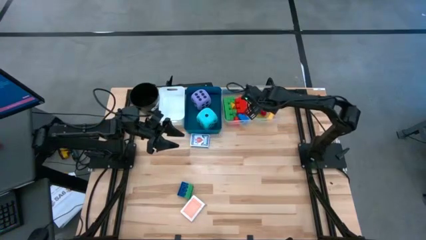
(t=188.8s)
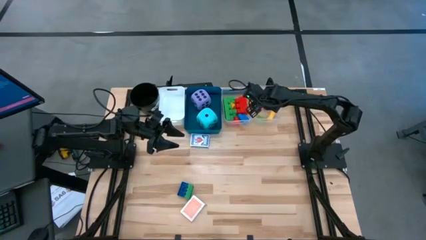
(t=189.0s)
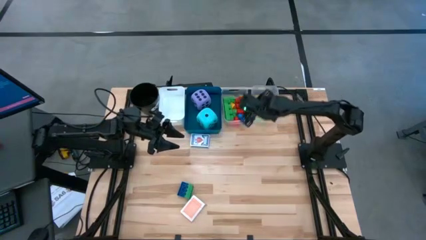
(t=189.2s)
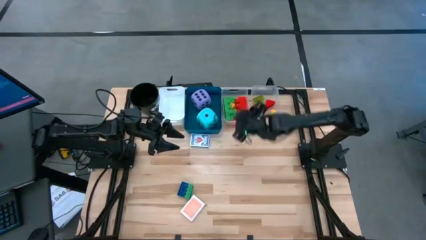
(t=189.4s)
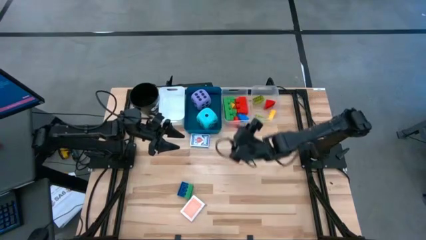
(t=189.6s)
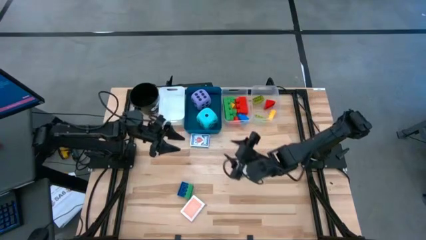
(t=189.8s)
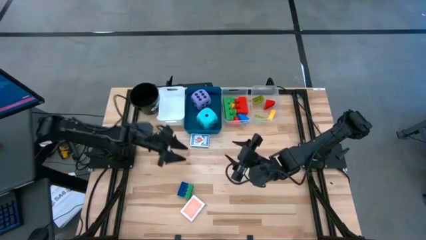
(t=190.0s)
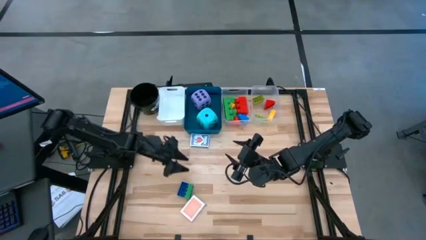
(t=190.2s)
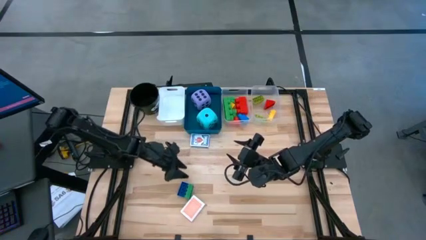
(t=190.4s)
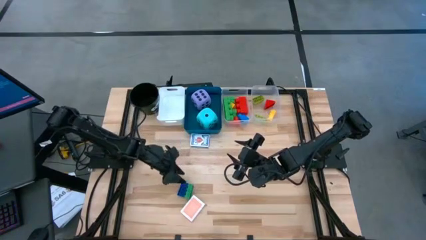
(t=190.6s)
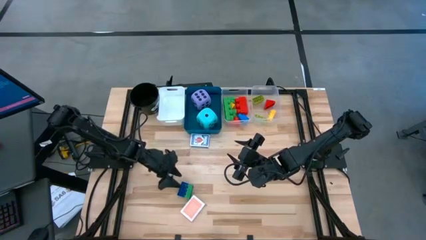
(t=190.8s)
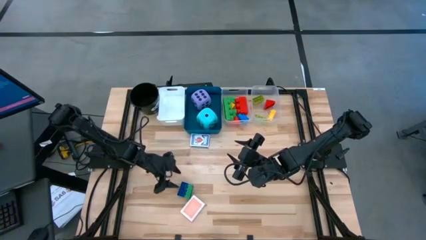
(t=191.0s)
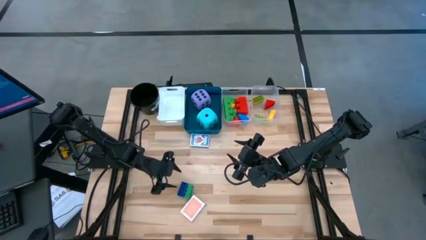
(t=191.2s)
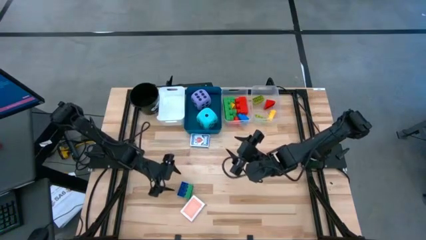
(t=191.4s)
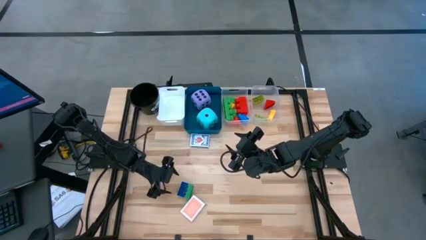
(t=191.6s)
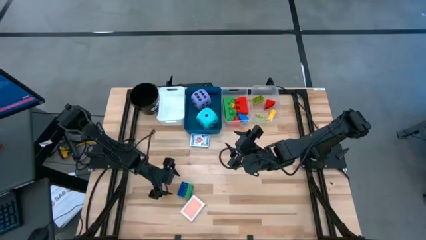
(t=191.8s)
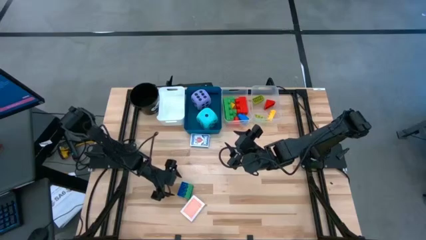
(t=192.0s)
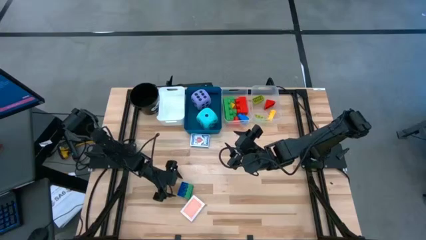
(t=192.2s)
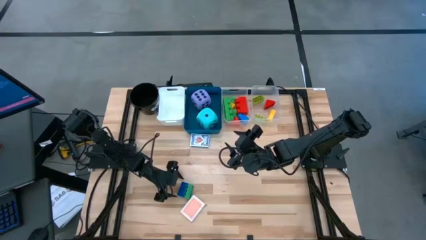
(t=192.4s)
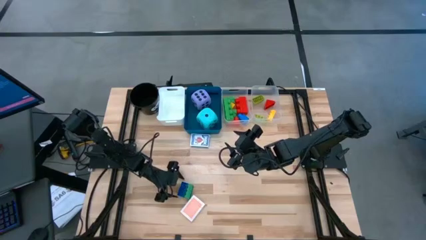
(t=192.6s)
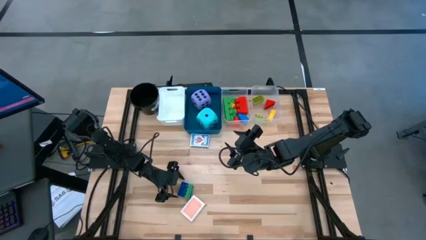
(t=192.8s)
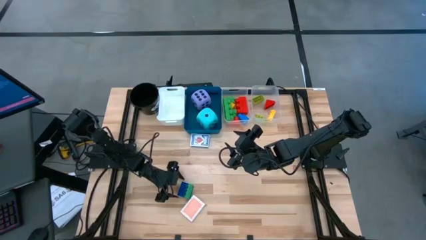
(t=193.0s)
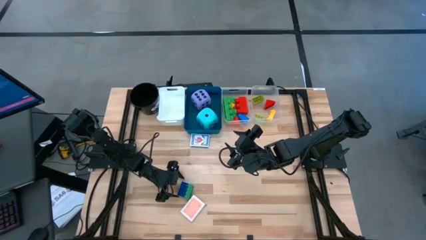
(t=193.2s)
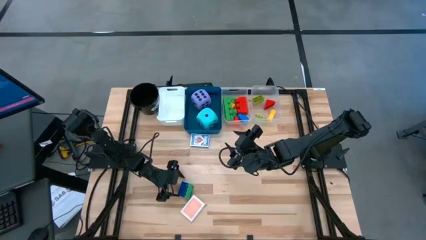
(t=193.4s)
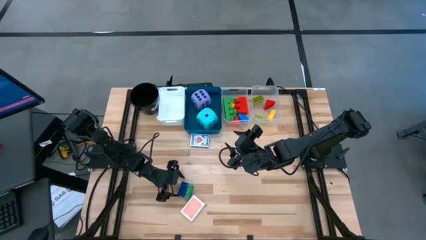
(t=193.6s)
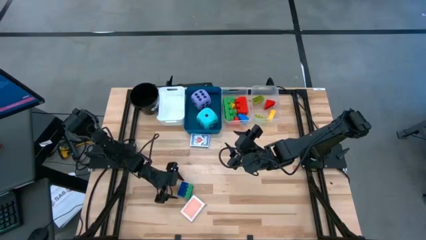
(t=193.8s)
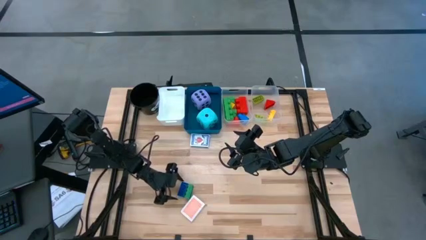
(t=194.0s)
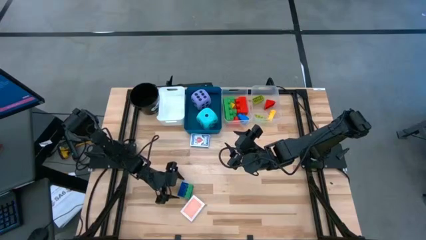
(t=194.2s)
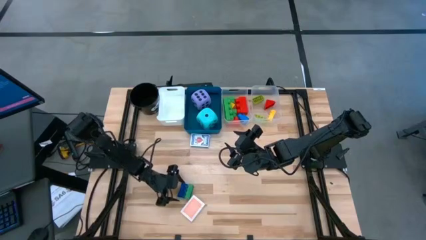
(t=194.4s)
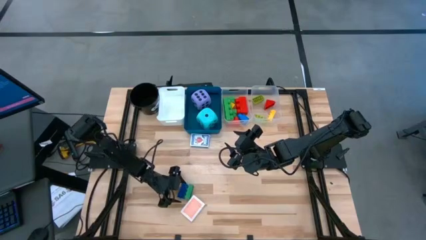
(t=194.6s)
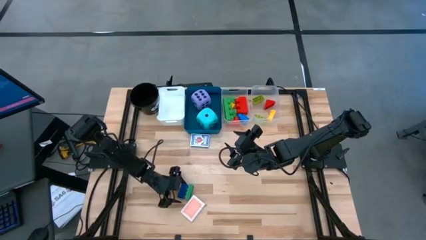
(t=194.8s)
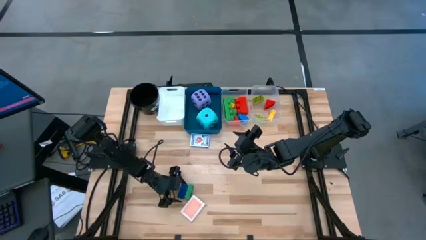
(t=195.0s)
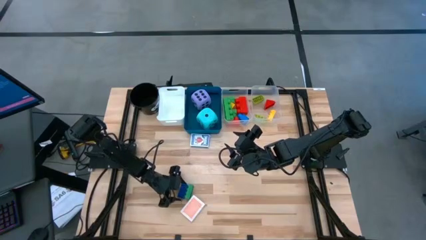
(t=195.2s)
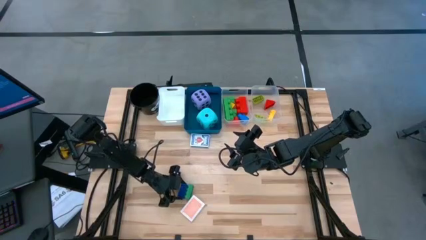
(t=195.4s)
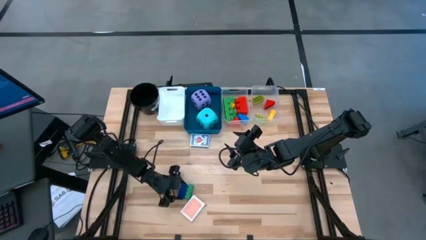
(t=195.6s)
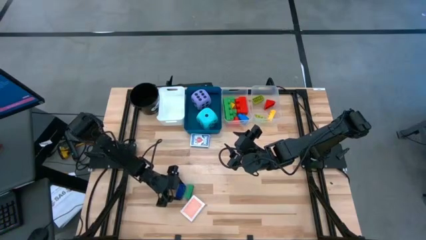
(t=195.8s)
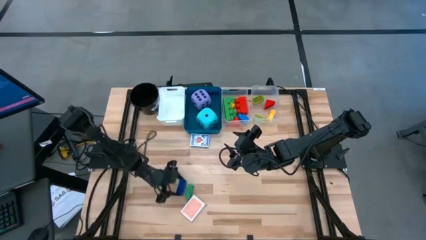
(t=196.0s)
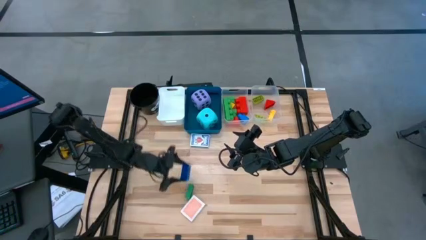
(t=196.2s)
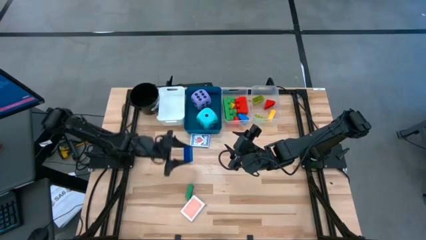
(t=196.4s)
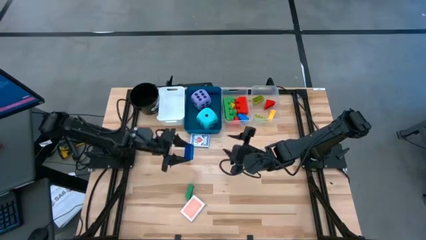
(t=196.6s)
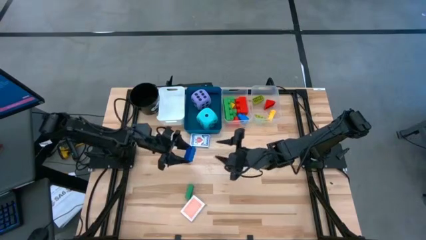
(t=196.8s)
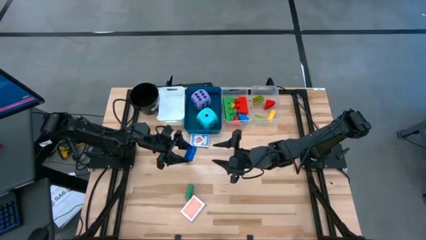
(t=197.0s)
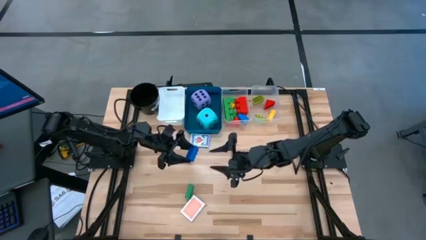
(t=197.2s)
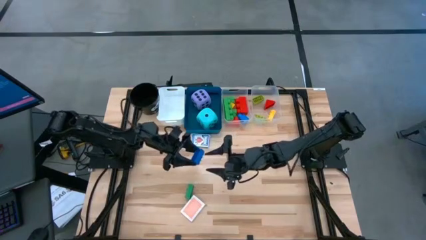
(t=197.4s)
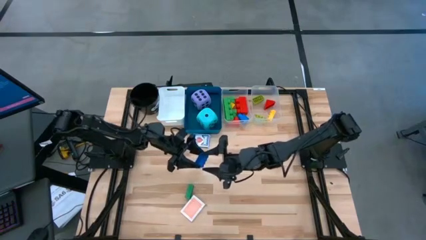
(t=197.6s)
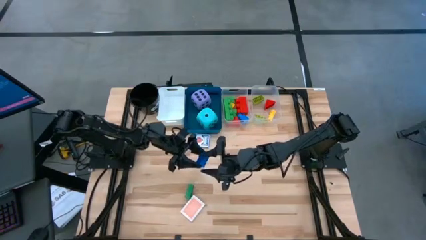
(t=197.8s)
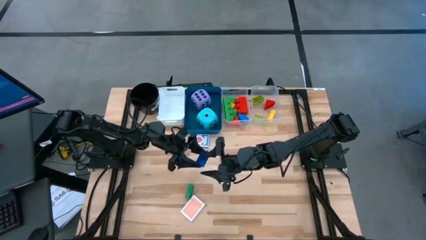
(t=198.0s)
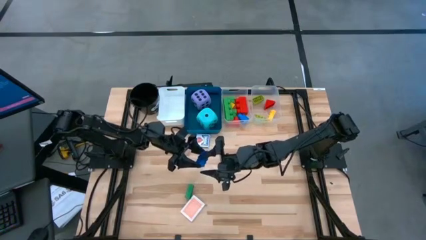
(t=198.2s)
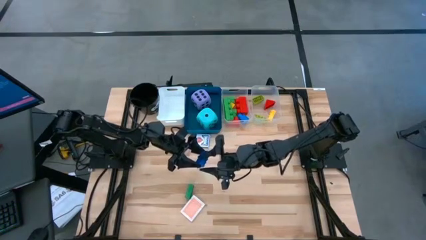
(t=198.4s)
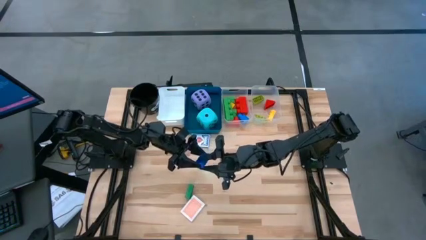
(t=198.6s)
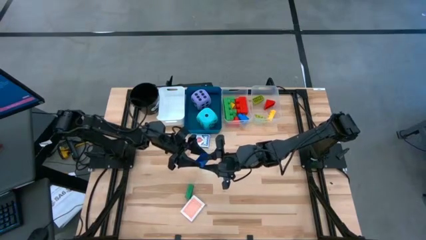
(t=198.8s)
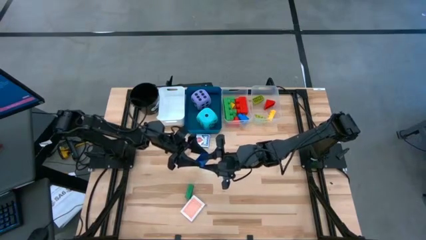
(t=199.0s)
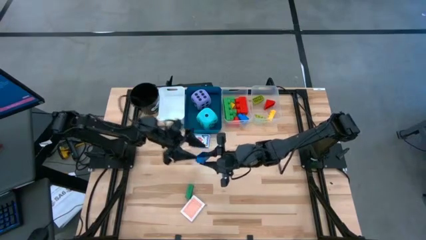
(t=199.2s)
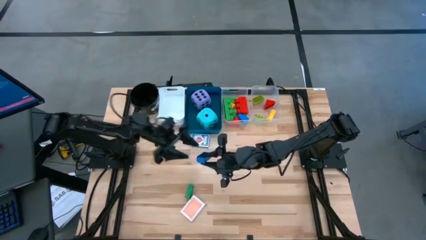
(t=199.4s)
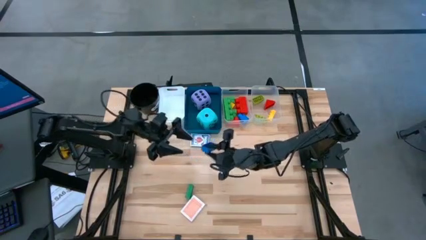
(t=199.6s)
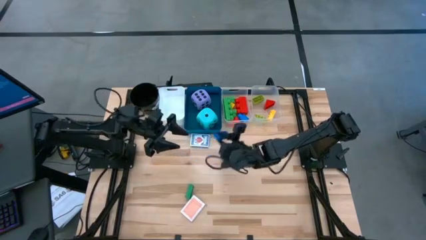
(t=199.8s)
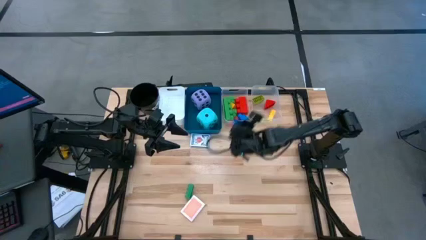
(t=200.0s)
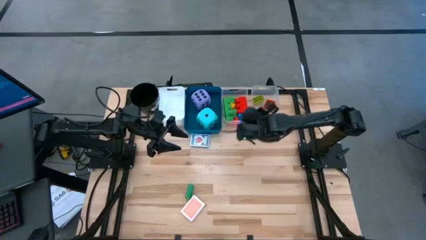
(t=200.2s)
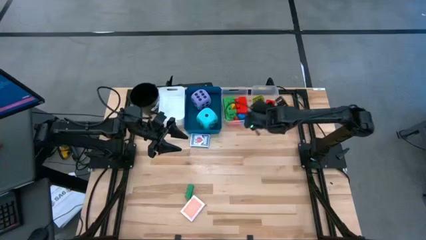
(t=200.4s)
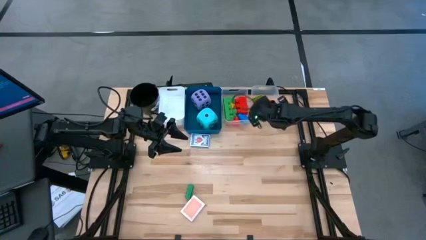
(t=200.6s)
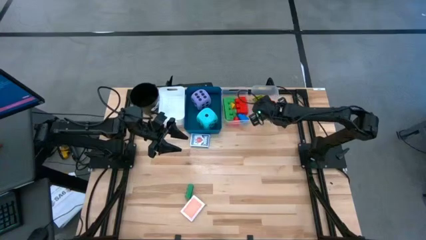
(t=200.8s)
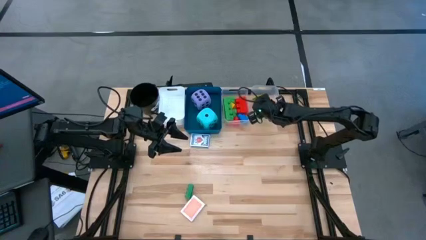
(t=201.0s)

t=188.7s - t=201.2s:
Task: Pick & Place Toys
Put the blue 8 stud game piece into the right transparent bin

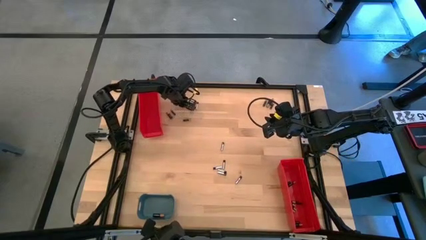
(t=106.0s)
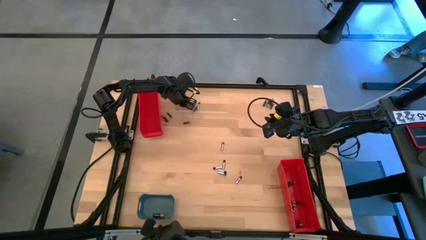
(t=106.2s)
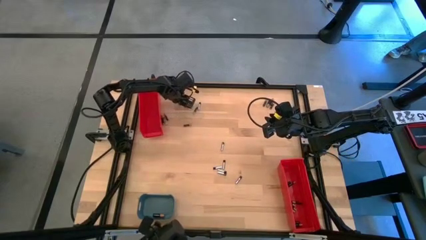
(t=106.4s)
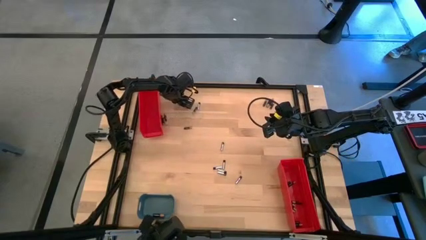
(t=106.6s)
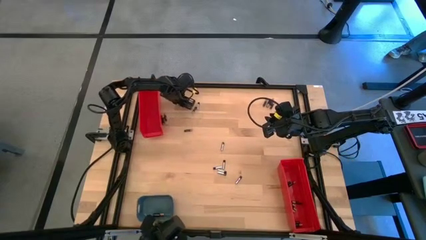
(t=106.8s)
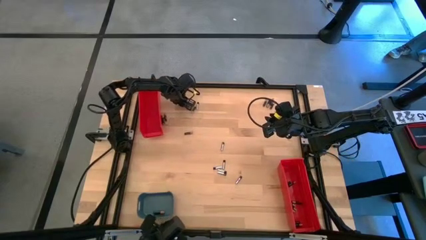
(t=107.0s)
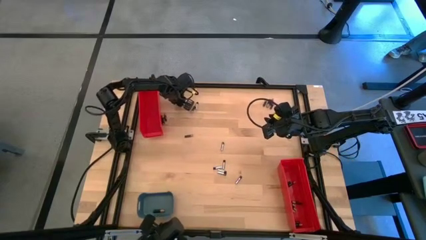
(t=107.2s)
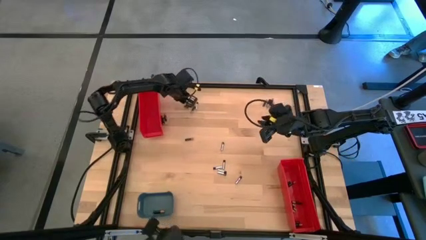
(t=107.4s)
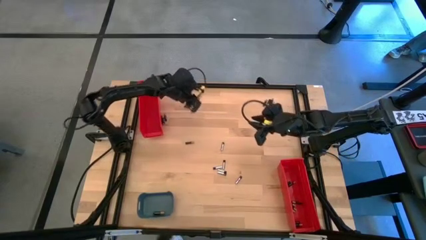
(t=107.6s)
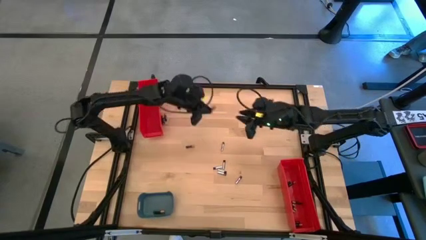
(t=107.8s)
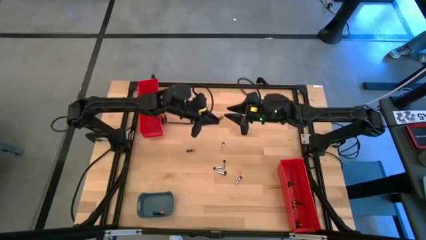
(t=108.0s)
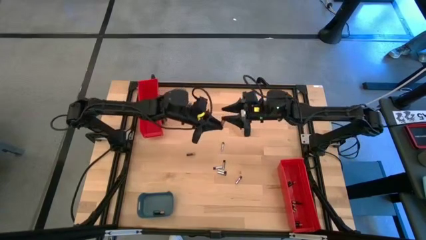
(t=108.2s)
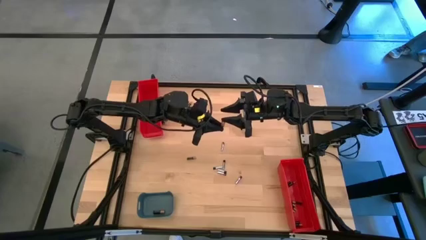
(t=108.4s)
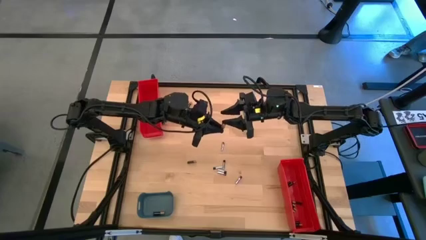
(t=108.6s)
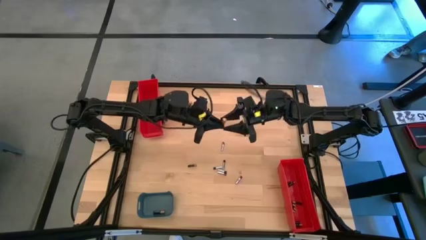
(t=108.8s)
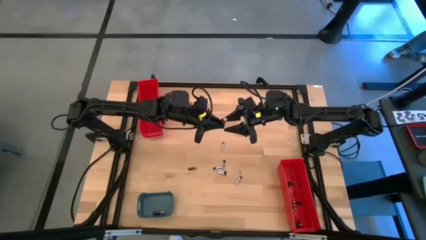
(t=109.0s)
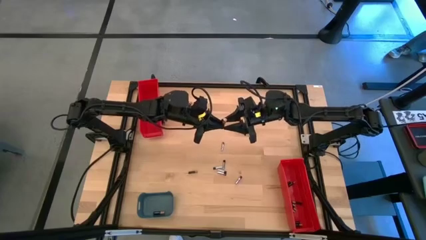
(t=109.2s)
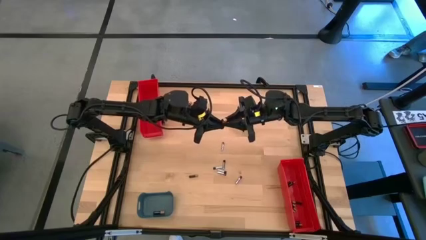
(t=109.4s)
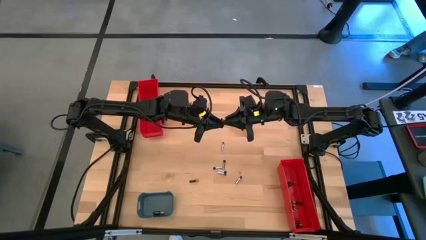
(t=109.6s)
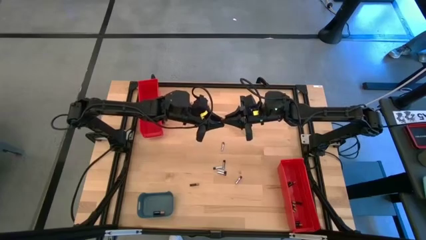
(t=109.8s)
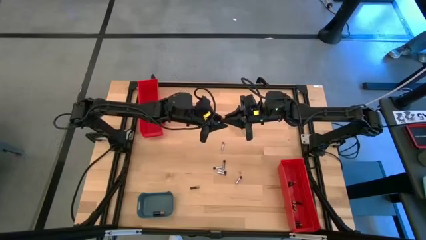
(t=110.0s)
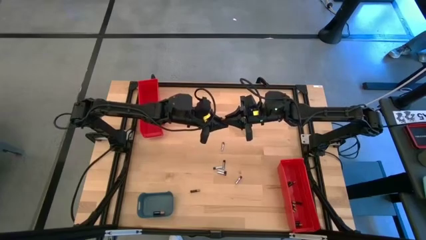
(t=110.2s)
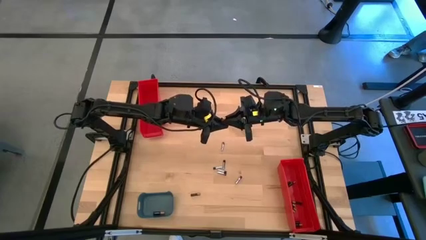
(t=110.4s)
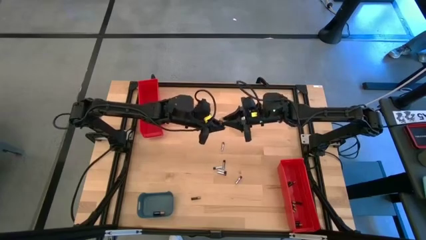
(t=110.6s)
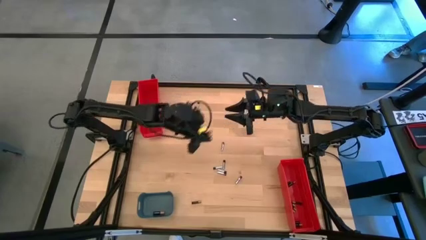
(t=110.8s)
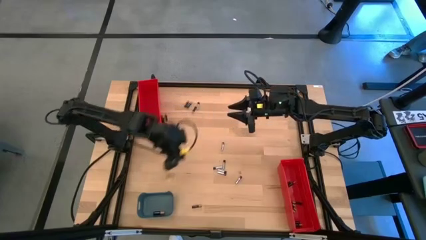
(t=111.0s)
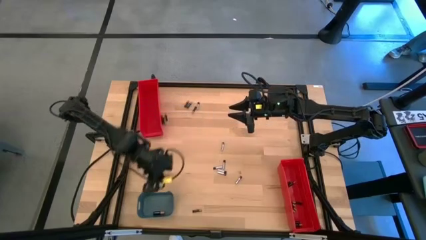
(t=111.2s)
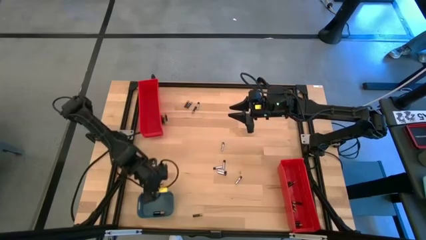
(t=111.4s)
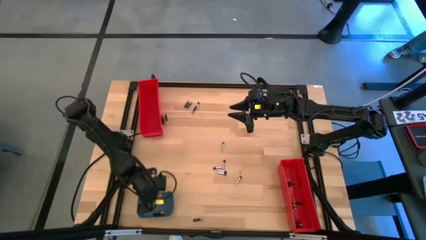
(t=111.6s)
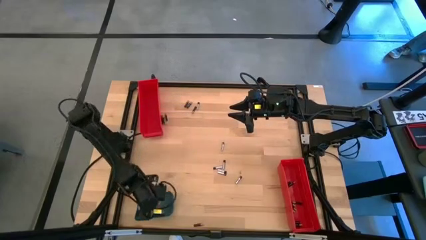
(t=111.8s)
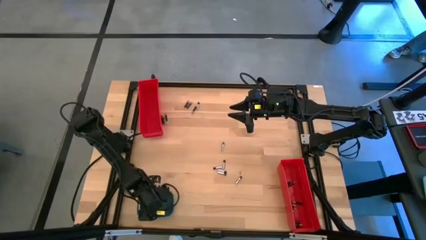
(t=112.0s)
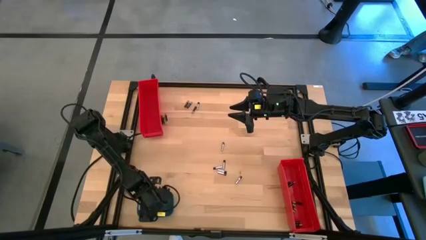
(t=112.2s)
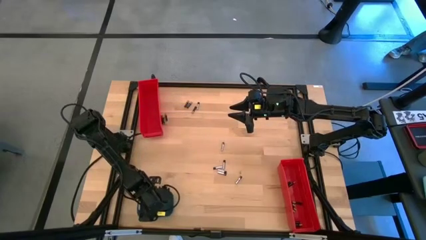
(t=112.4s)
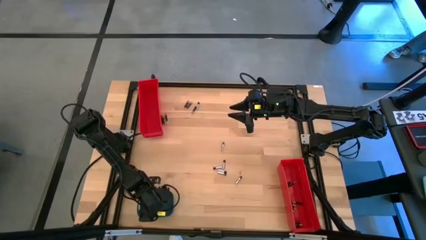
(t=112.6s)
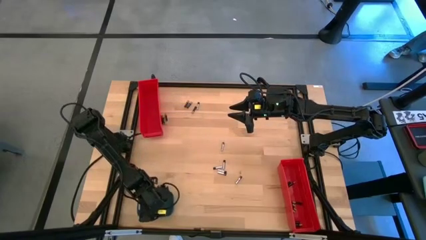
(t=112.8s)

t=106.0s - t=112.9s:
Task: Sort batteries
Put the large black battery into the blue bin
